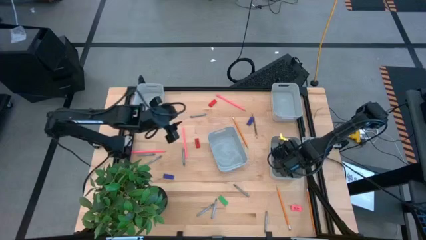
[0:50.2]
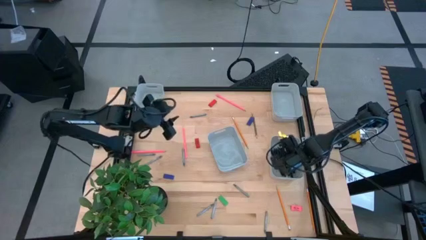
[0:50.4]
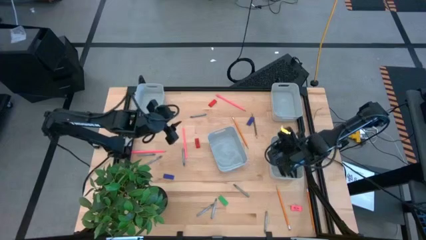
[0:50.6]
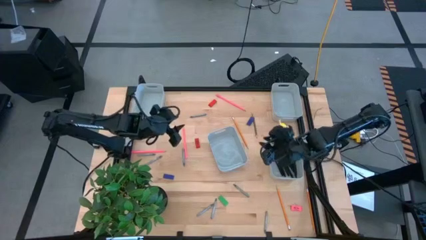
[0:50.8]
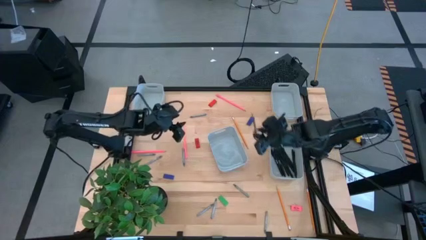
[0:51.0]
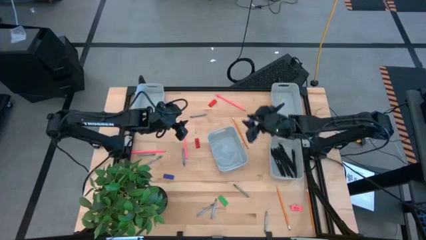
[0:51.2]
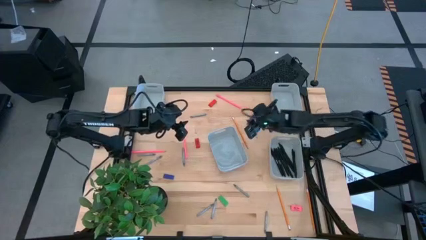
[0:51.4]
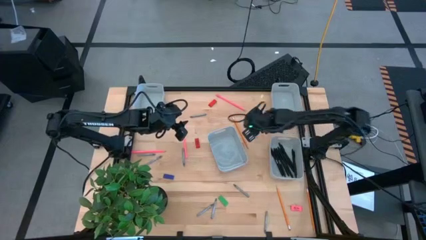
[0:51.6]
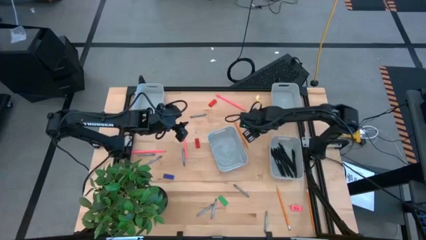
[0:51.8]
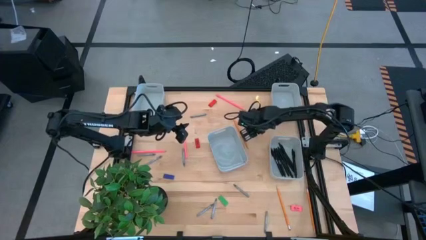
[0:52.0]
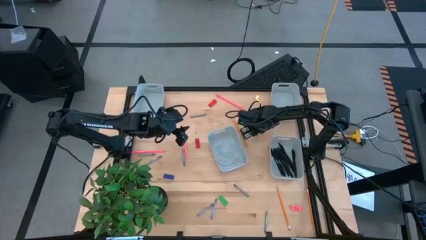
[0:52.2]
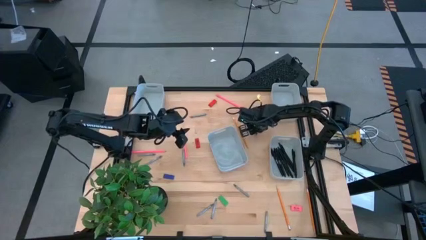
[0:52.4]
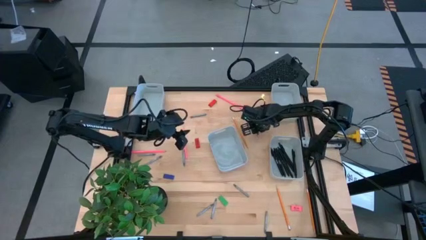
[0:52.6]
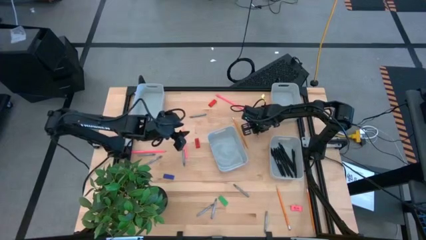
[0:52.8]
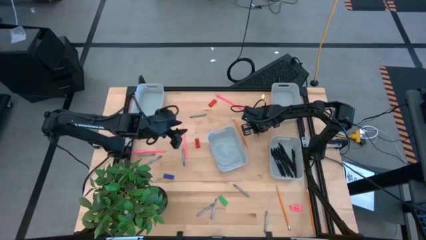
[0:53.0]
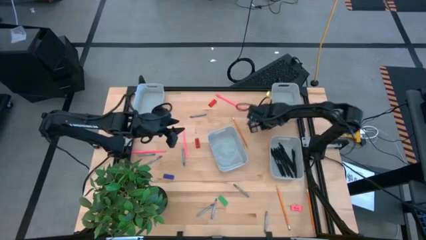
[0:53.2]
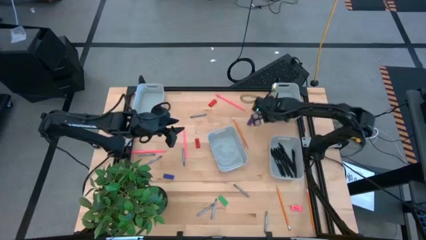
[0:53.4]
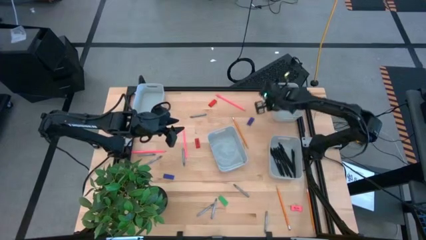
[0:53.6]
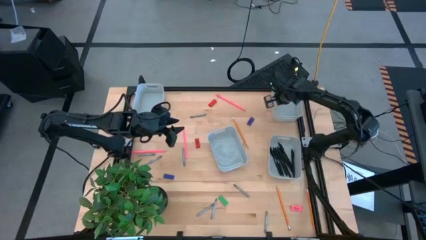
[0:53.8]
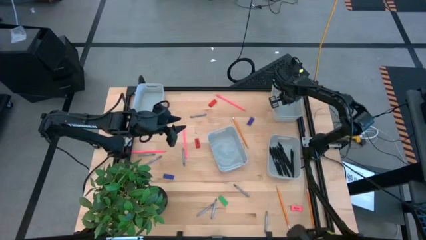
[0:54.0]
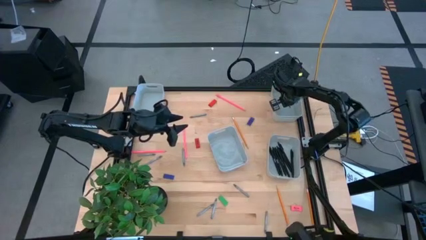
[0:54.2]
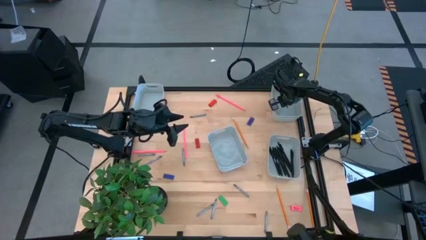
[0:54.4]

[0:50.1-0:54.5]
Task: Sort crayons/erasers/pens/pencils in bins
Put the dark blue pencil into the top right gray bin

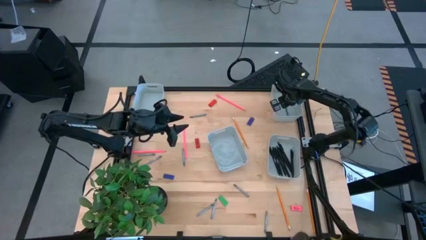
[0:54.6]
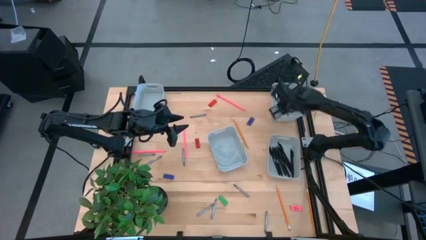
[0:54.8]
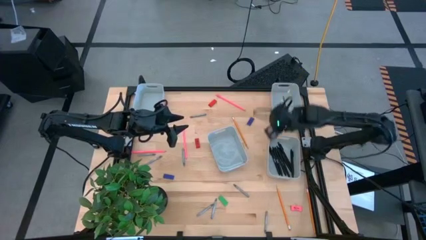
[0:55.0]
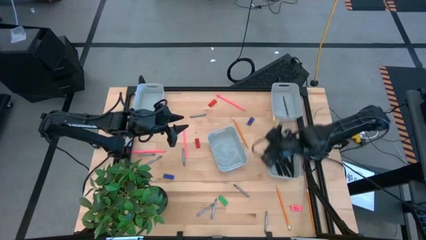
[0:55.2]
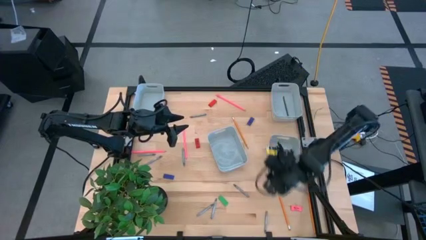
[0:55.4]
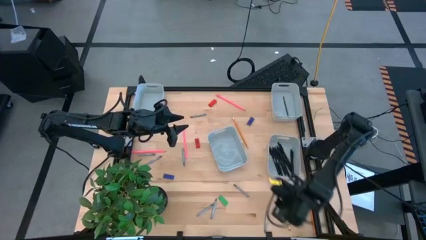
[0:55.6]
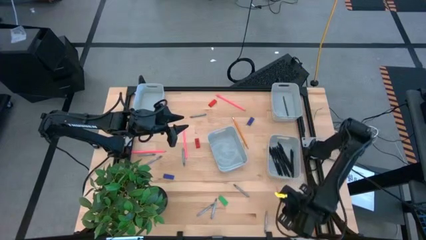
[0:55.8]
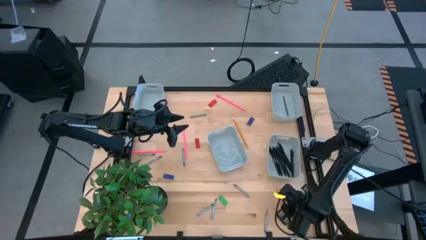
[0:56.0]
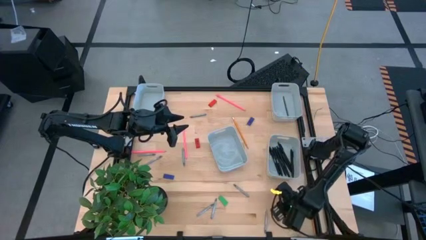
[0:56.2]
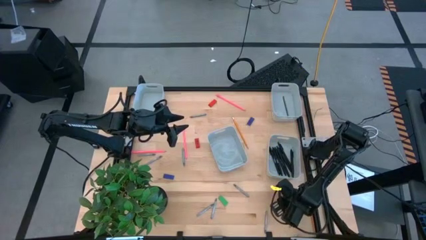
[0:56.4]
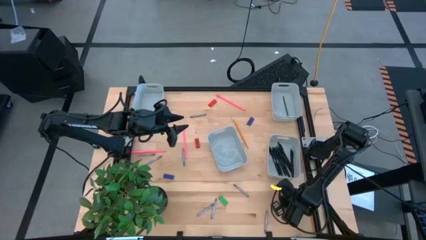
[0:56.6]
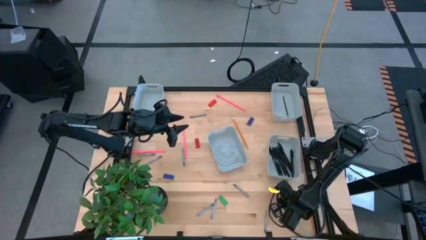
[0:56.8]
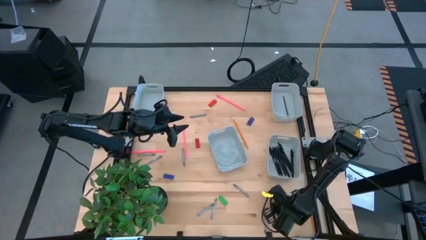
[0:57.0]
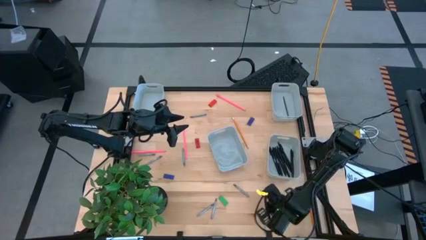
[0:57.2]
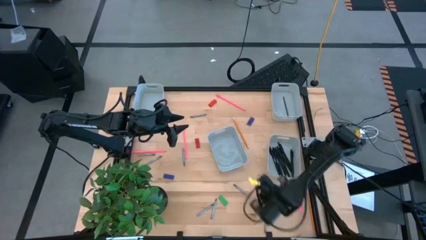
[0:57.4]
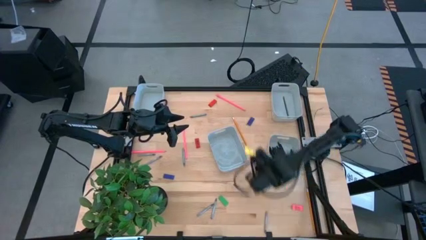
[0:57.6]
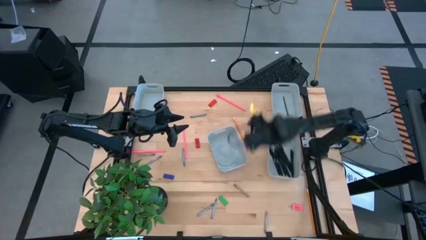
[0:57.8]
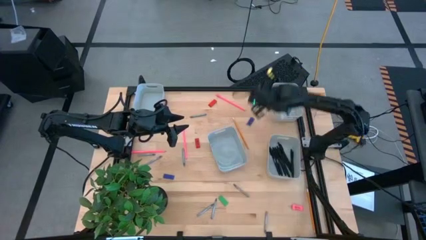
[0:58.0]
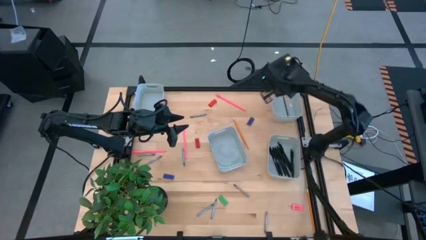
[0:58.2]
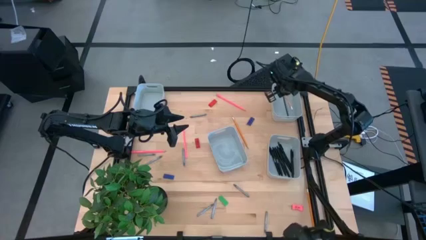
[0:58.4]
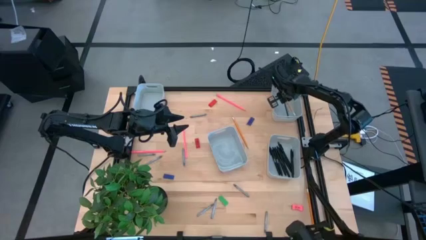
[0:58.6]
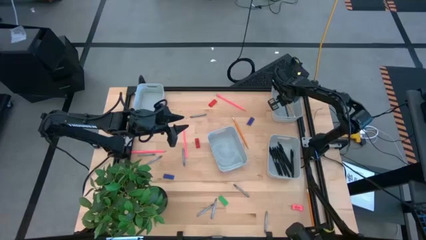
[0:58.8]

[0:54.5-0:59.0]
Put the yellow pencil into the top right gray bin

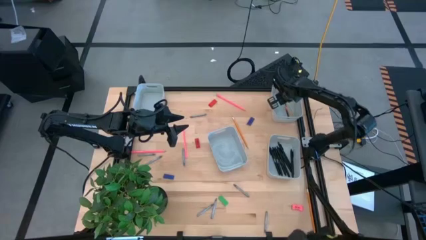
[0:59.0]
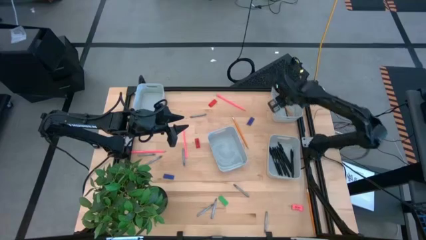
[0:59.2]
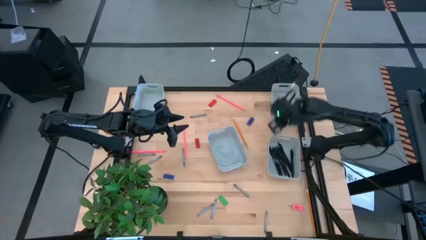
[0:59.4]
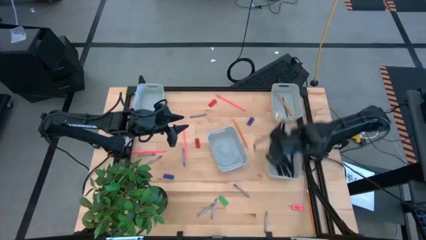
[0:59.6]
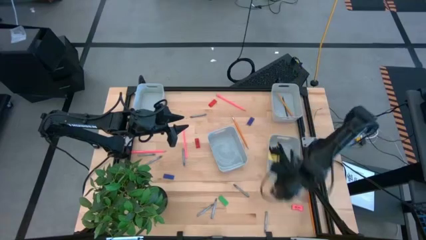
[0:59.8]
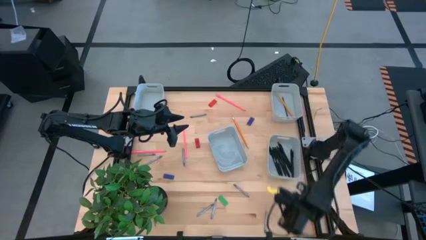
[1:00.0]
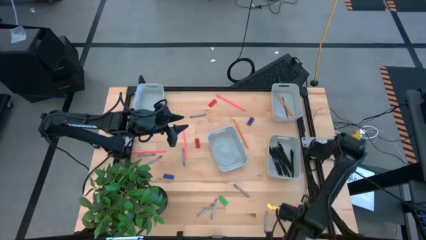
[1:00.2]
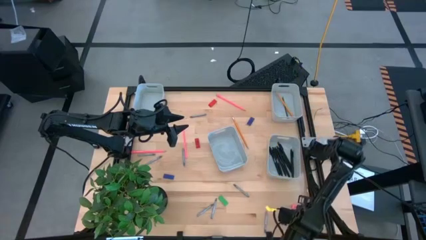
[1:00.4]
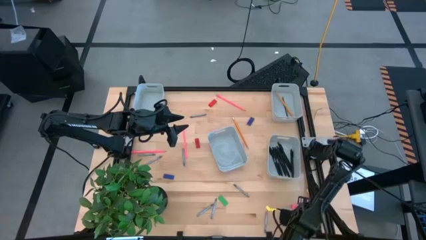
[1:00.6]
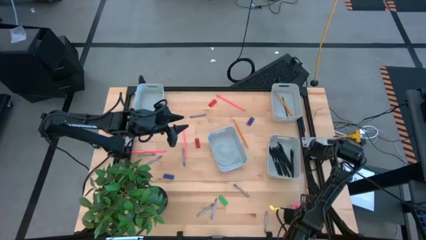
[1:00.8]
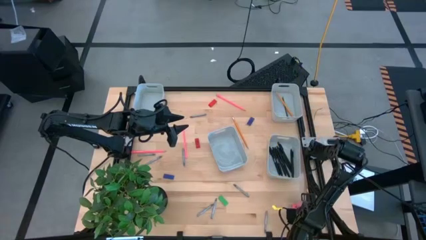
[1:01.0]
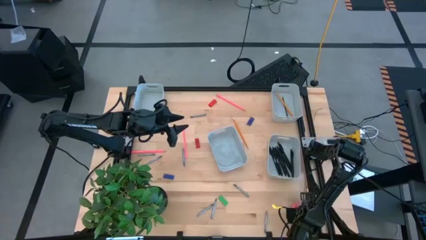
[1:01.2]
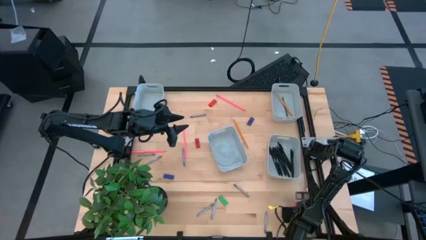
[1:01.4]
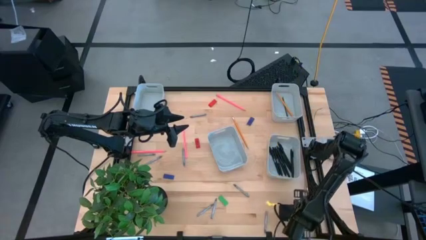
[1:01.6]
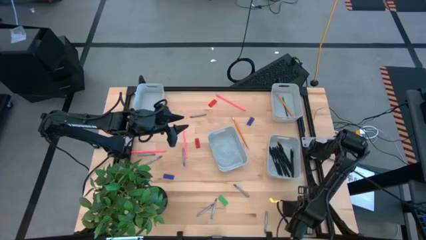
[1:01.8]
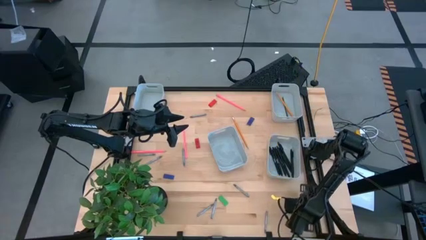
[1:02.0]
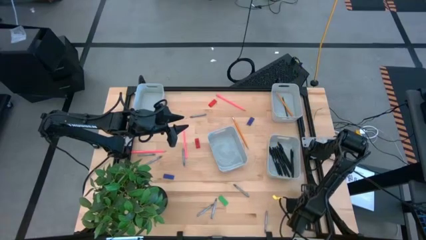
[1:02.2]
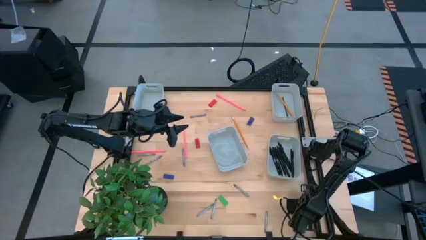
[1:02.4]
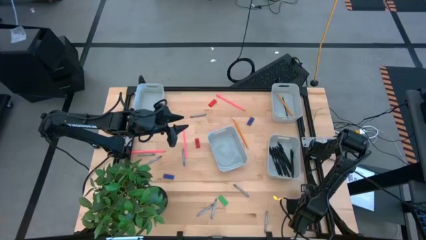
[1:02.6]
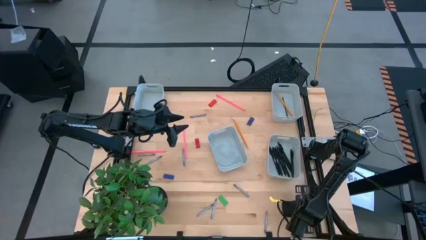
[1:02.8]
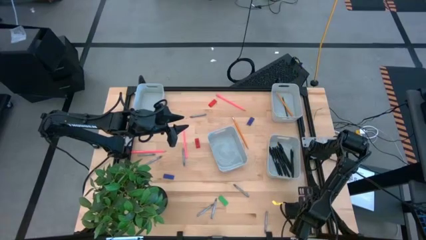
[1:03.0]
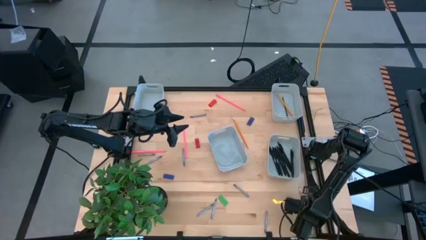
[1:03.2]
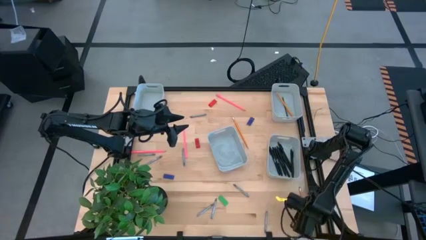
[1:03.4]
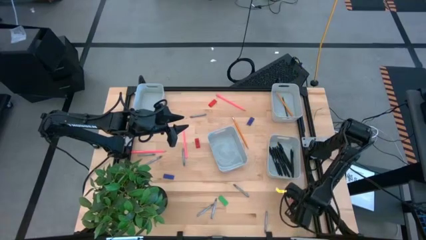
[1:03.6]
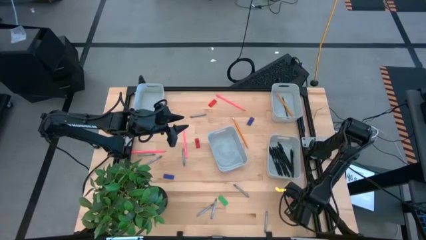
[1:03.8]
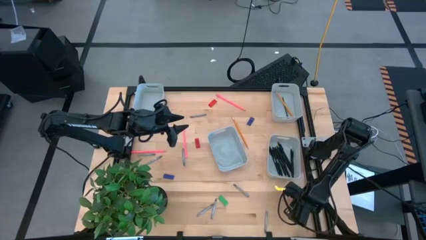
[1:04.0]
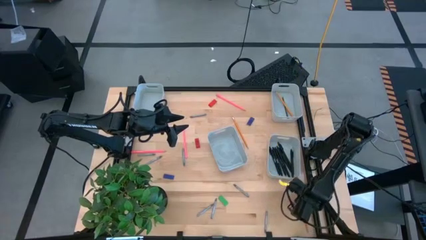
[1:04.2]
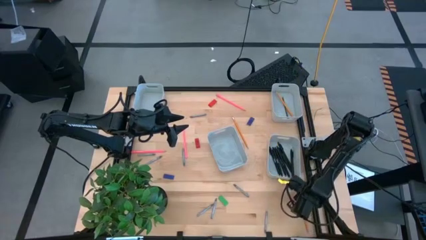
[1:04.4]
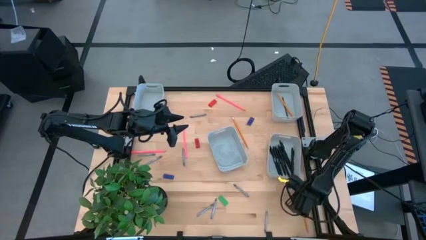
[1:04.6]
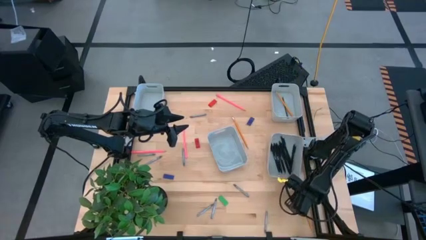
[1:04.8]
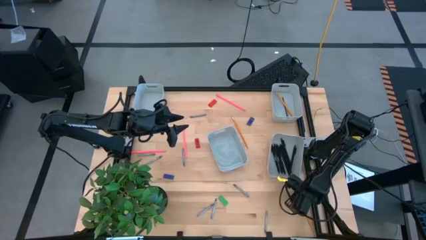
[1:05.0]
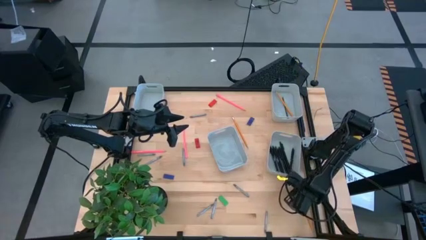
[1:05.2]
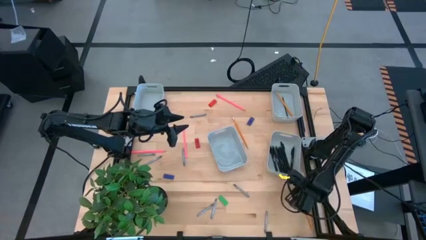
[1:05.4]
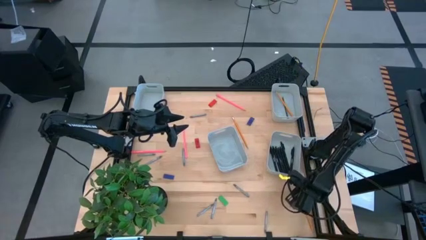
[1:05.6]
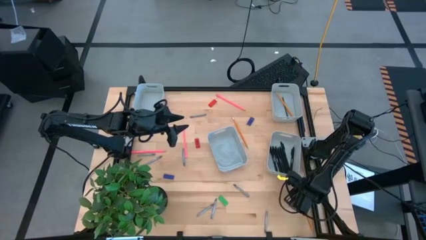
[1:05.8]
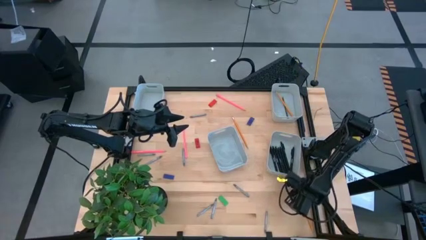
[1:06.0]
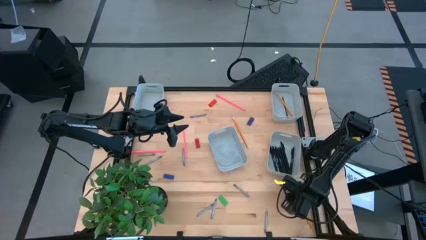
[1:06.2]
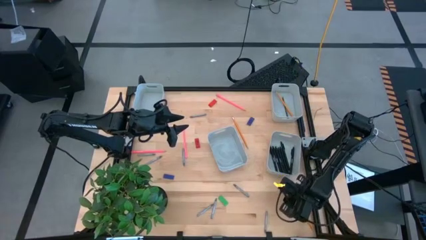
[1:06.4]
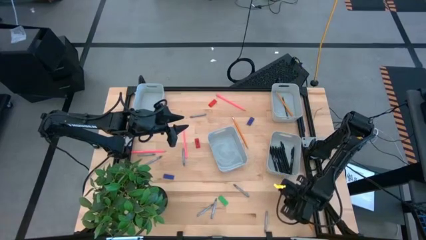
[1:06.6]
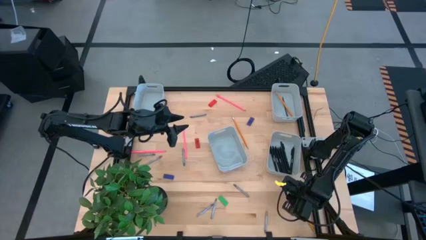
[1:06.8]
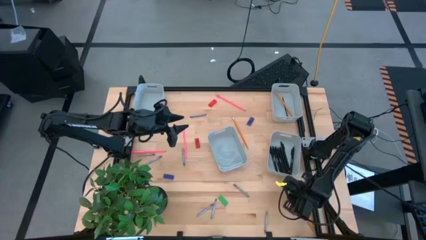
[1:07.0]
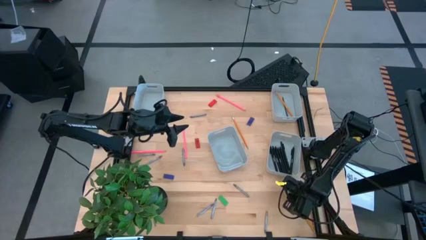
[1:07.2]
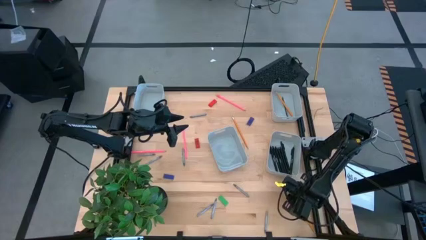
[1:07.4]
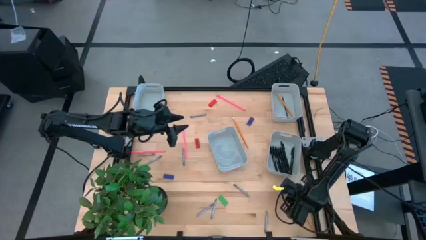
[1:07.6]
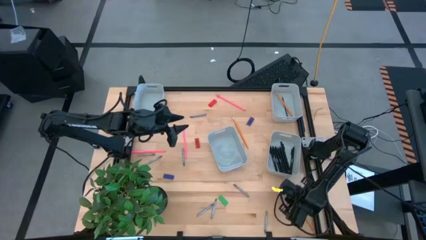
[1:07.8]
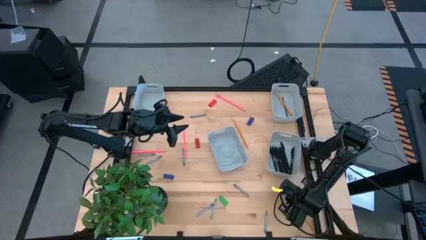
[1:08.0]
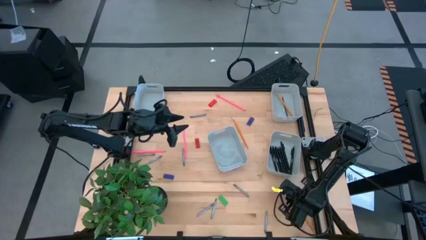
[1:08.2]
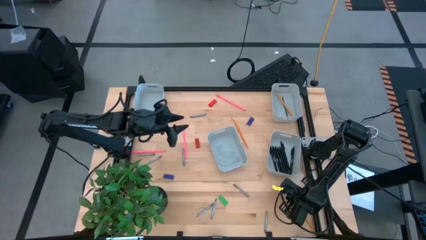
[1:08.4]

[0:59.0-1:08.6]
Put the yellow pencil into the top right gray bin
